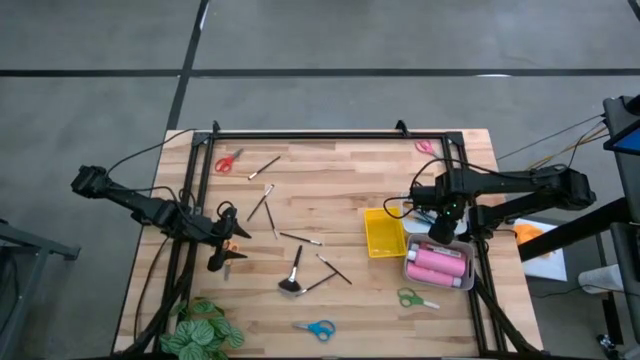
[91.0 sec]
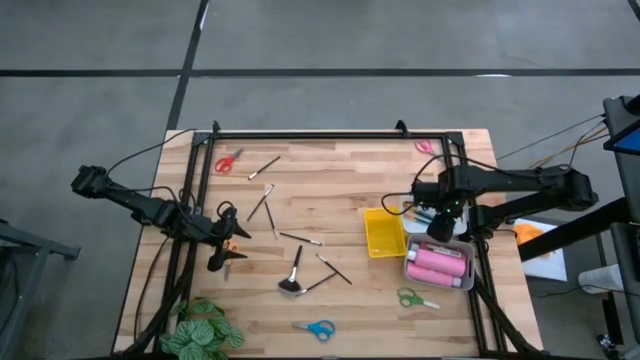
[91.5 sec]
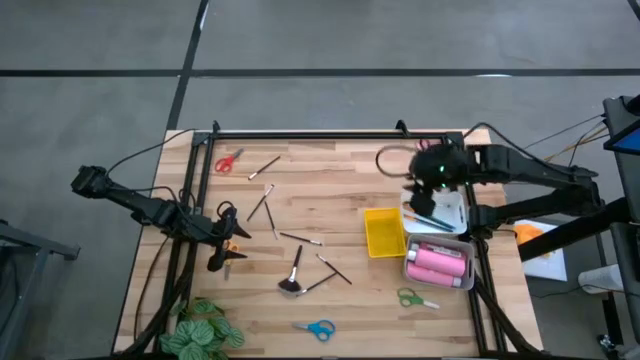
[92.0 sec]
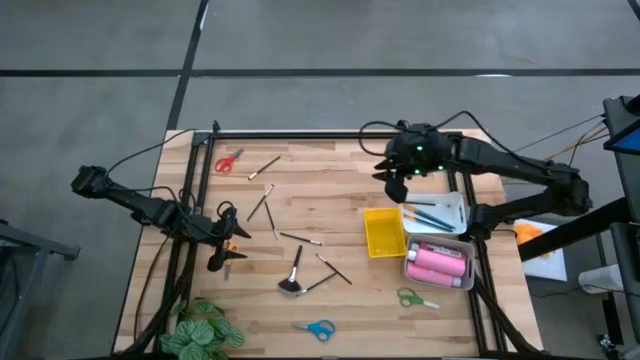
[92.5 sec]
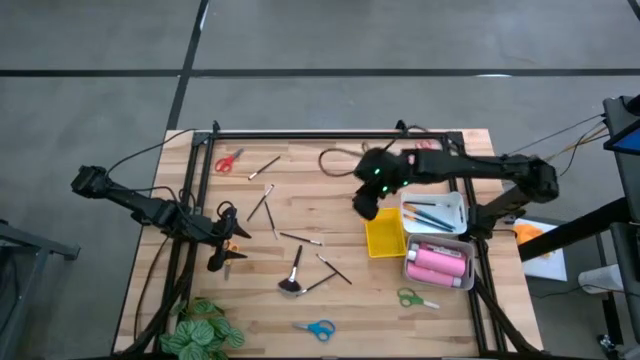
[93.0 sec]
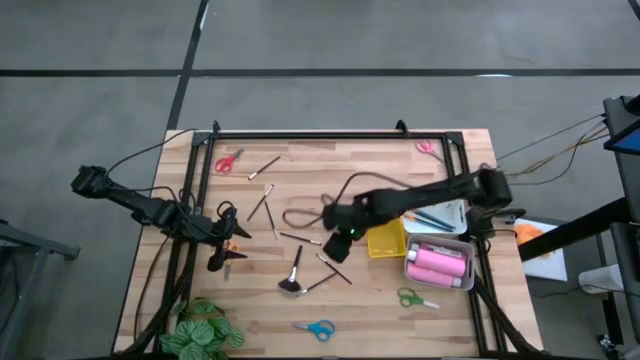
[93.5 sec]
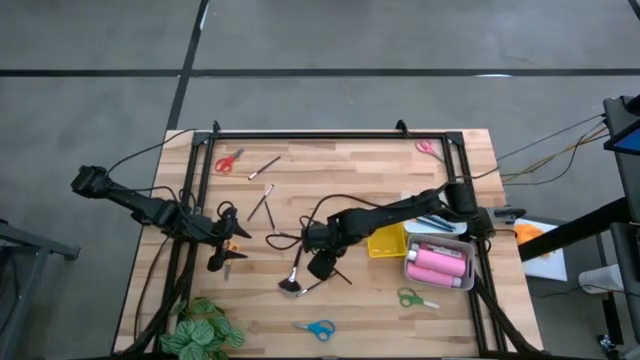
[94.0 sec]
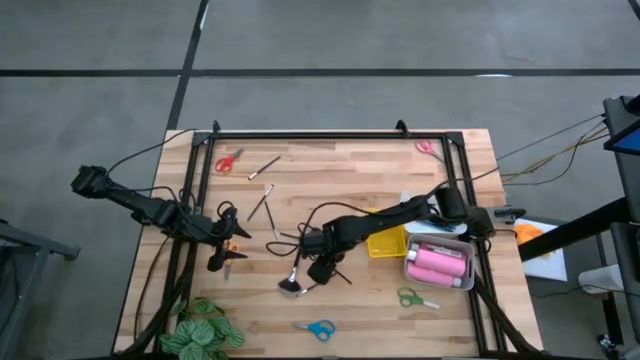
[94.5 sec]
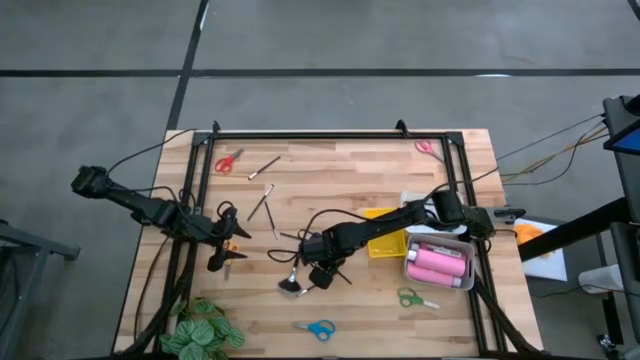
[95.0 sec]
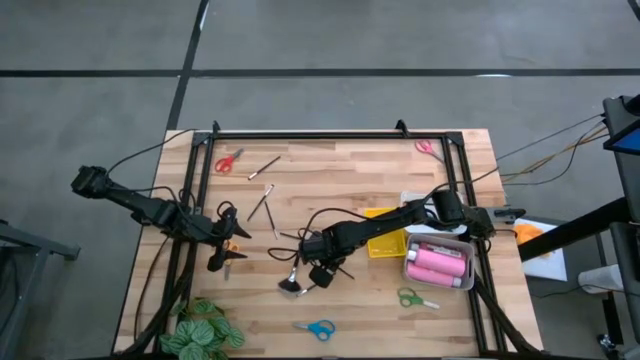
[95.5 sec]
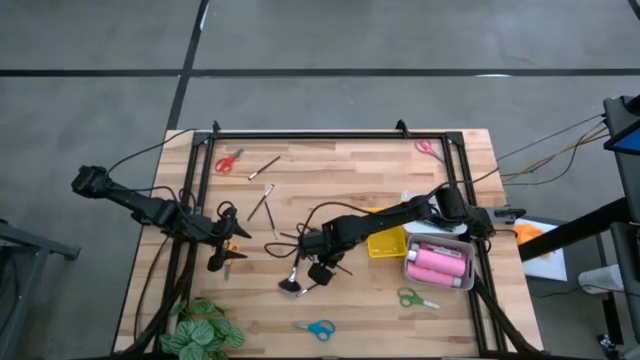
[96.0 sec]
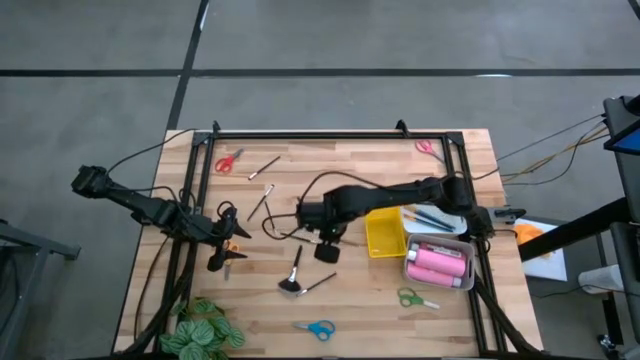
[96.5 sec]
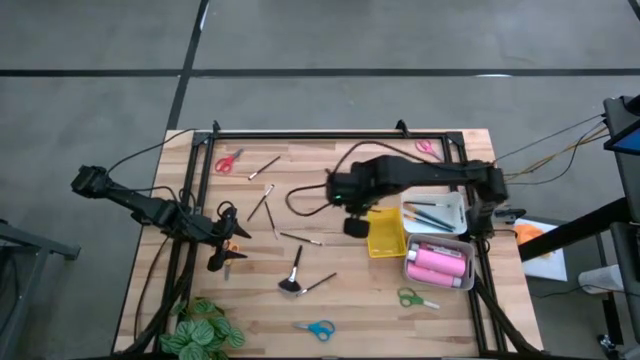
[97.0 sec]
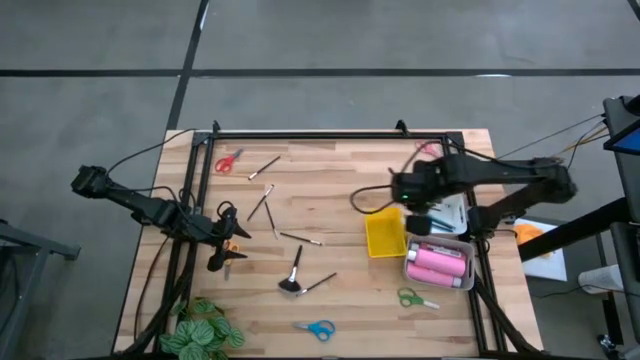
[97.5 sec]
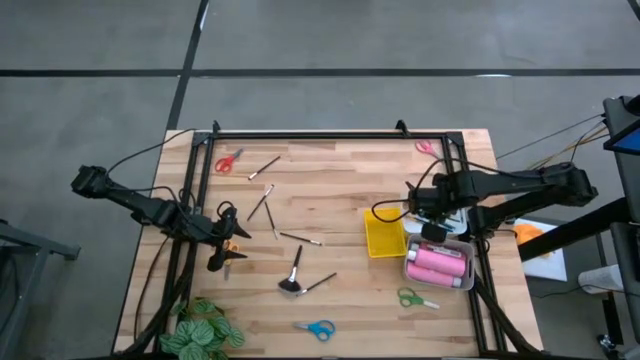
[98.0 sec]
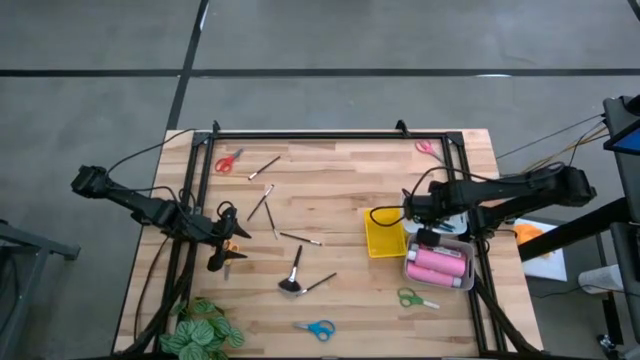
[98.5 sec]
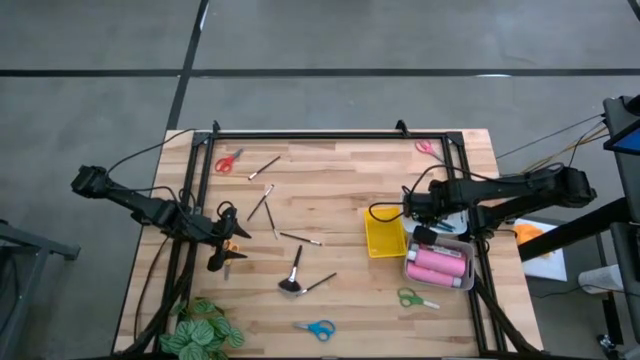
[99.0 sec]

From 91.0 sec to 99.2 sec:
Task: Pick & Place Paint Supplies
Put the black paint brush into the white bin

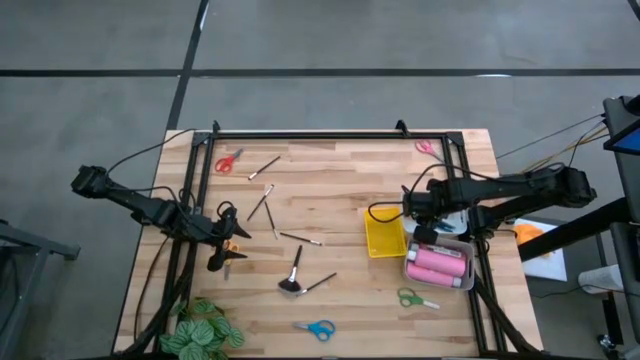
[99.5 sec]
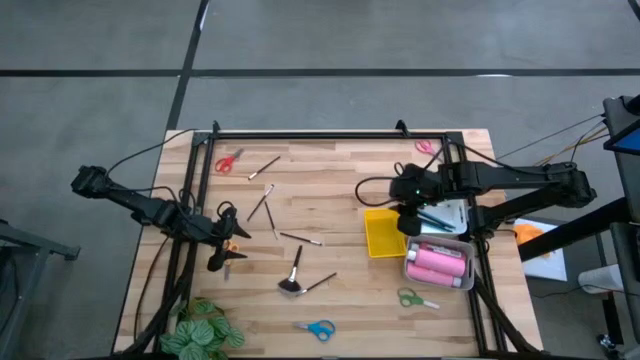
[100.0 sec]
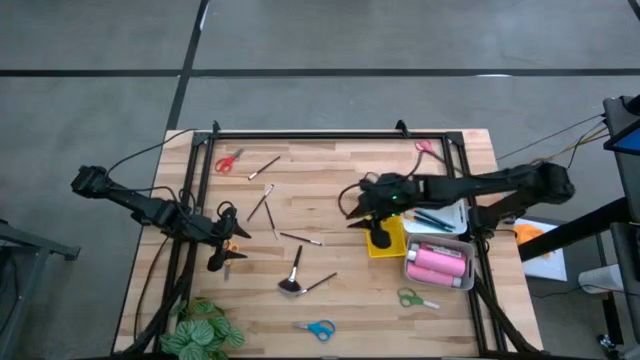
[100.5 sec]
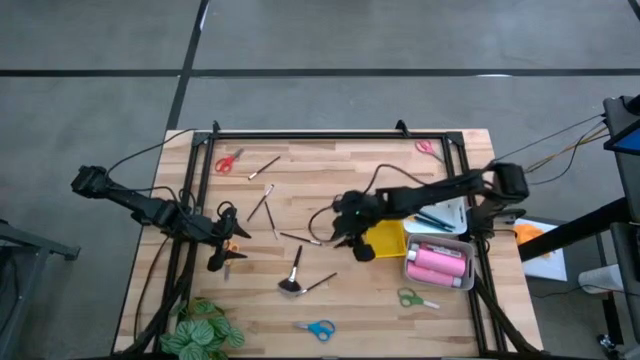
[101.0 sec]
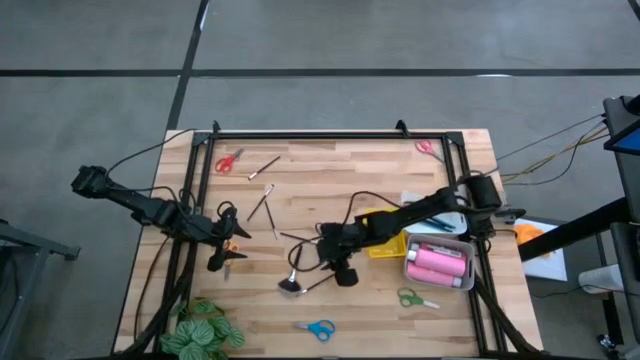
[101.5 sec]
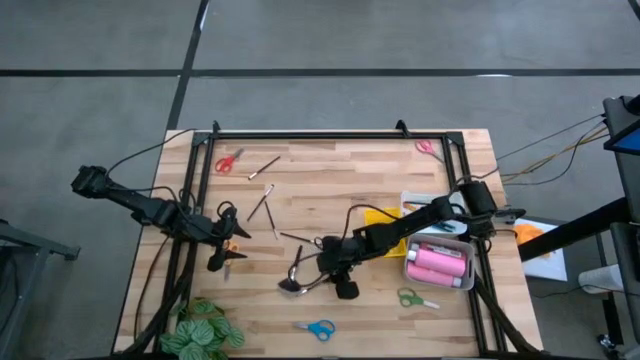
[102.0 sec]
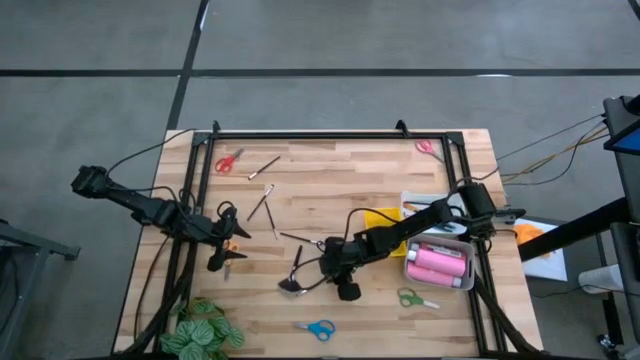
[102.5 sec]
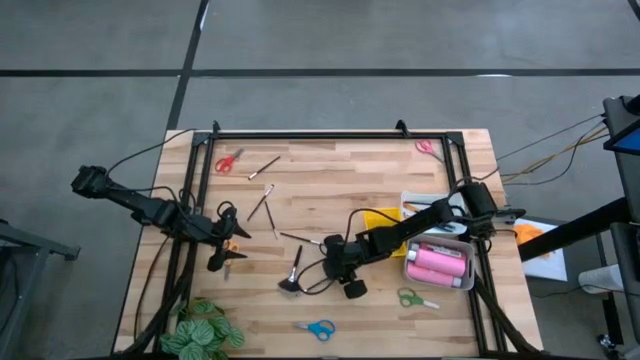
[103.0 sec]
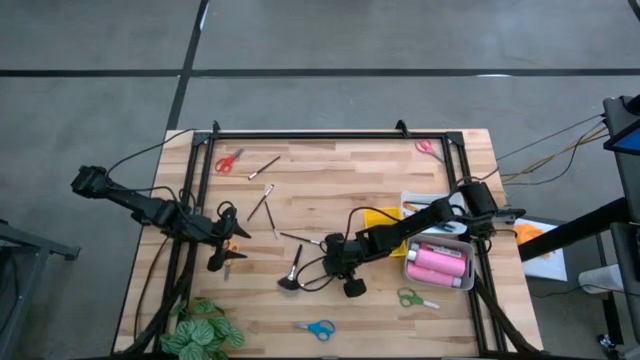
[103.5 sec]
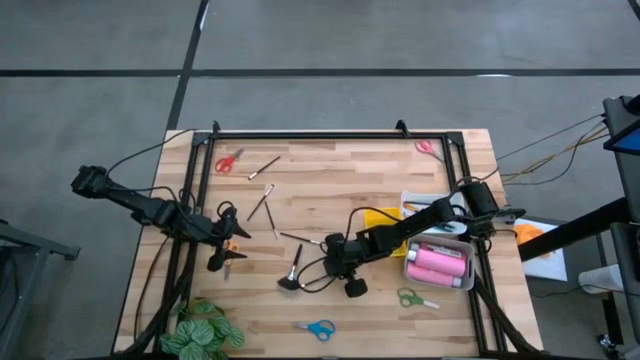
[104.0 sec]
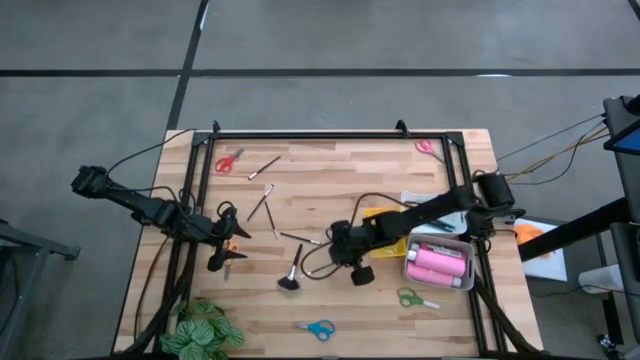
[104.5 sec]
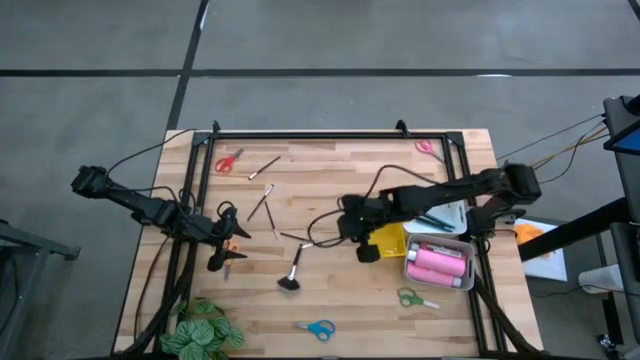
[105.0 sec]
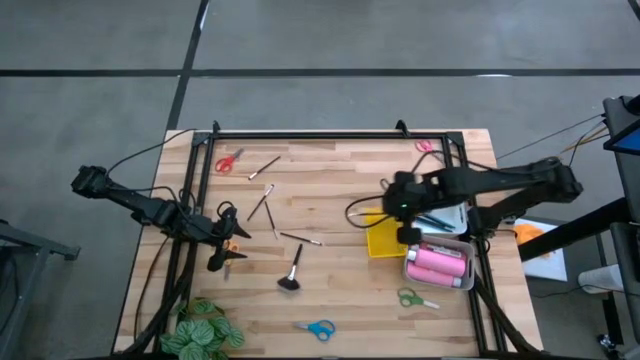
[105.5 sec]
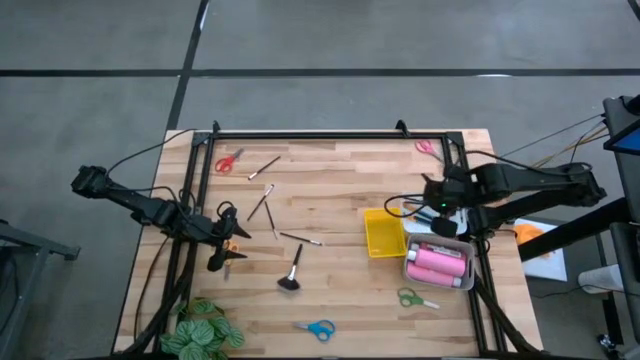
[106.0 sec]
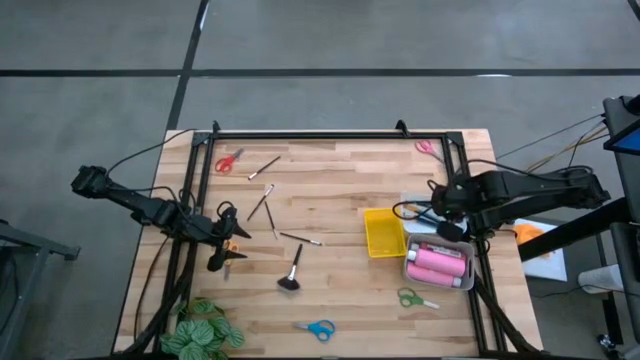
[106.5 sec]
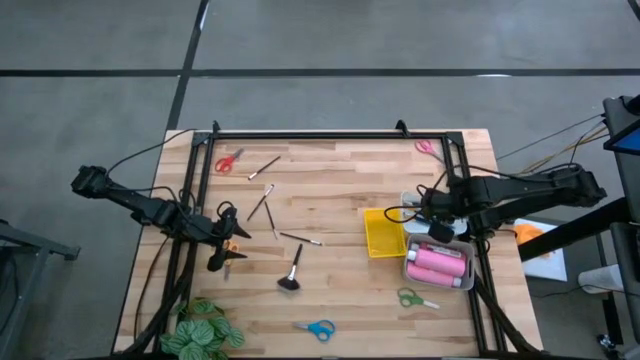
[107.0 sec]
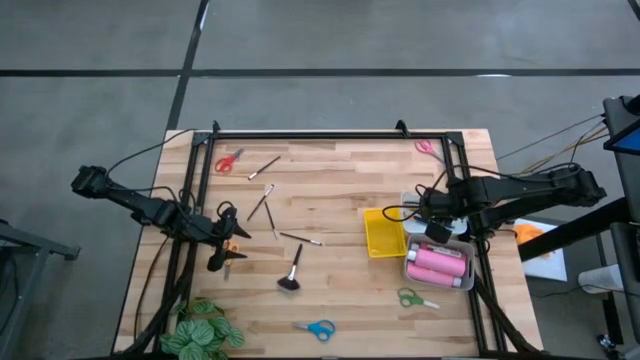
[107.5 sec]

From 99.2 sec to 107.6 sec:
Put the black paint brush into the white bin

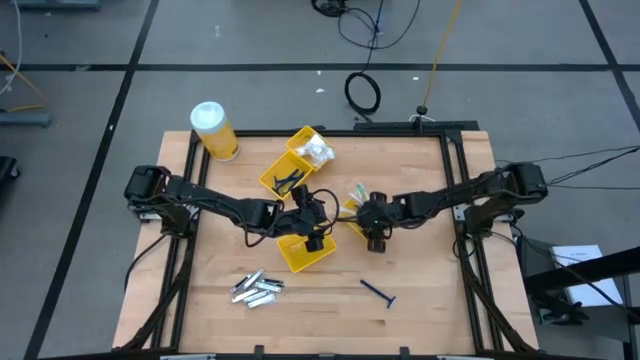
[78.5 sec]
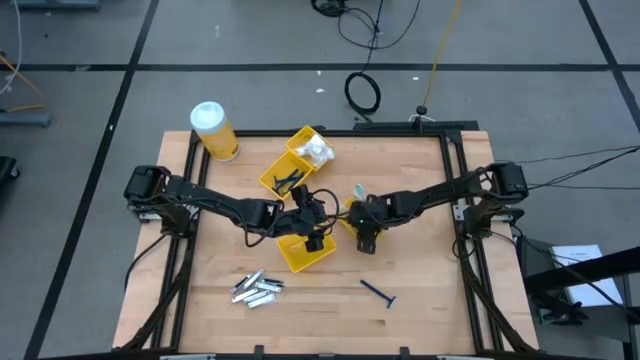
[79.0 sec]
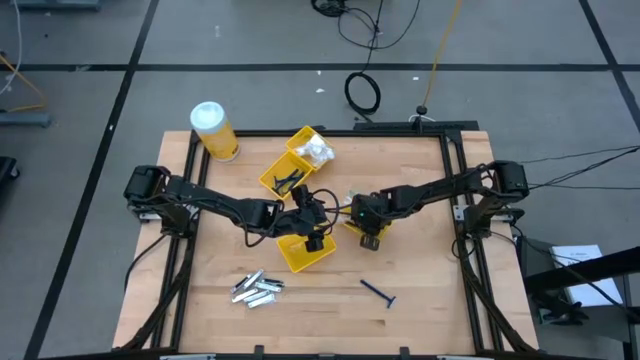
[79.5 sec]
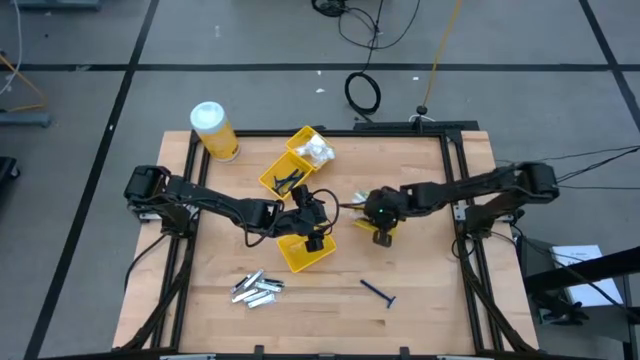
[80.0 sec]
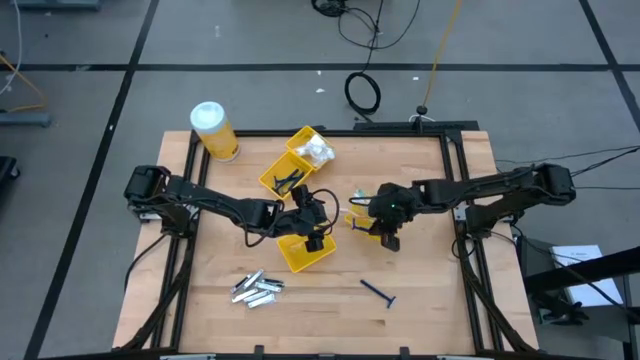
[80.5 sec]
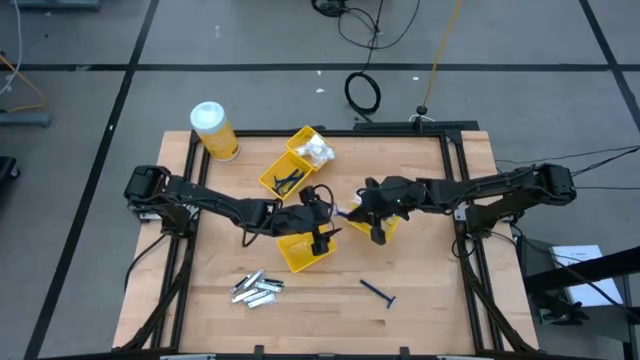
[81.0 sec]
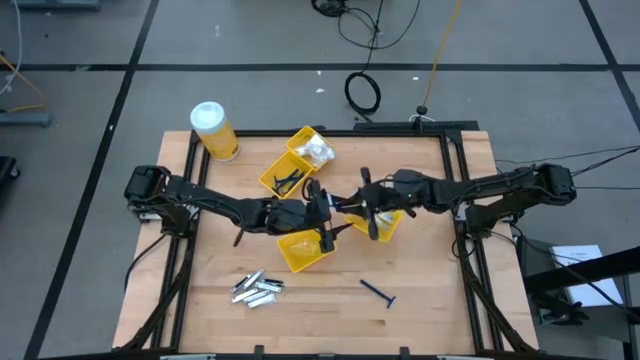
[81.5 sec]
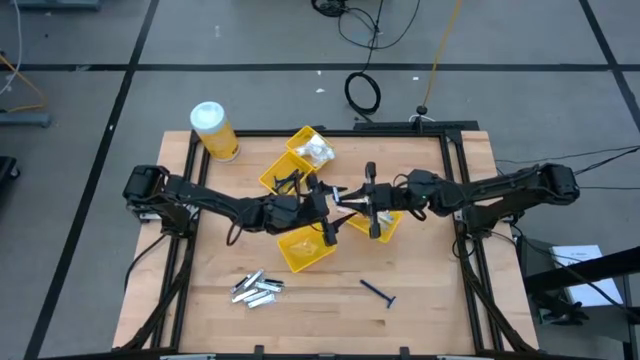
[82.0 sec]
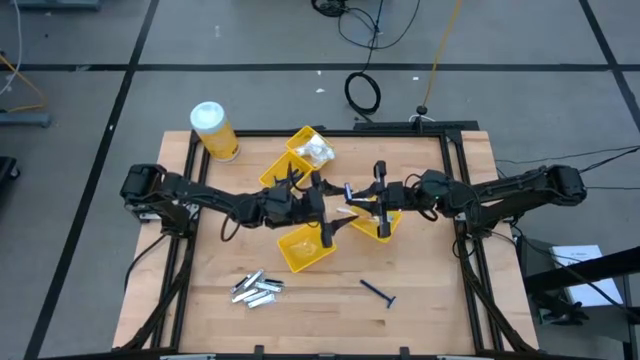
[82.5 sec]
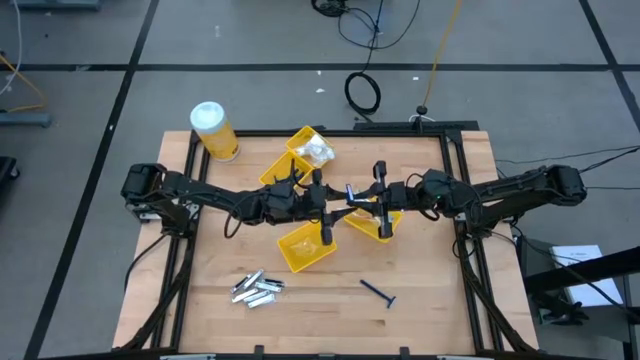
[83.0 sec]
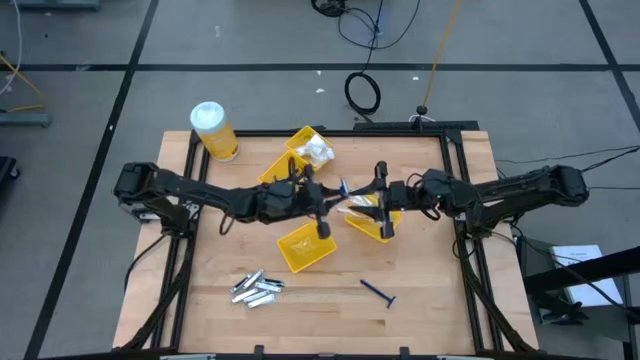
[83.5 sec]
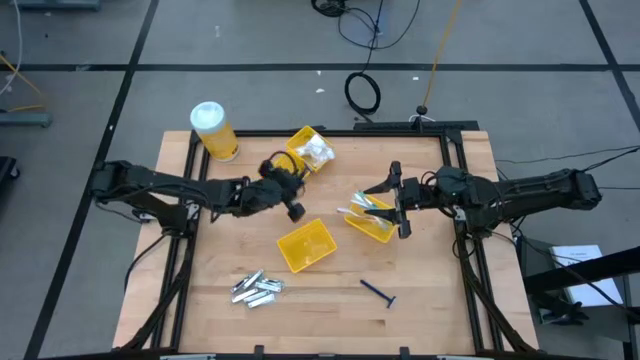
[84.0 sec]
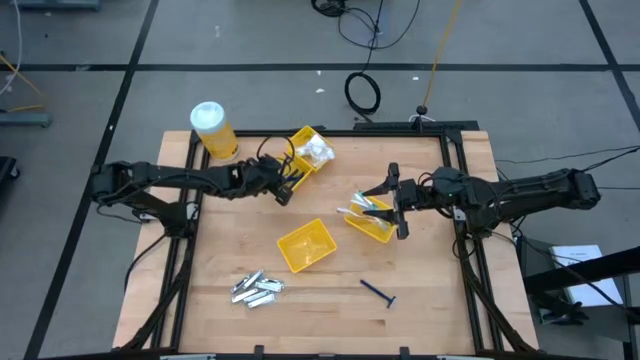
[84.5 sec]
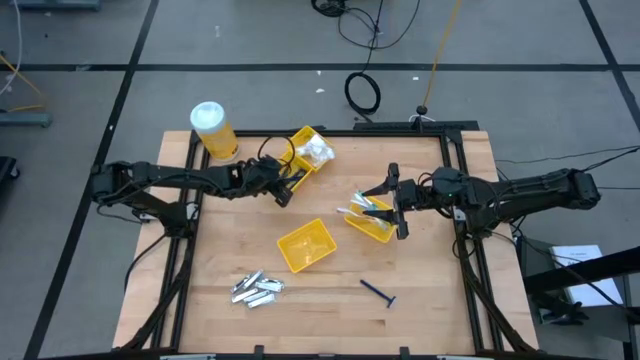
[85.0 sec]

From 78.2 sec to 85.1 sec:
Task: Pick & Place Travel size toiletries
Put the blue razor into the bottom left yellow basket
